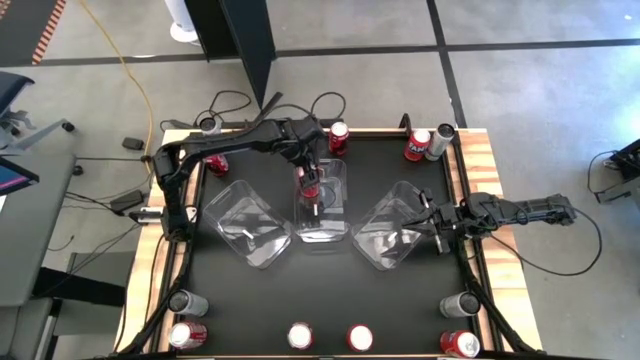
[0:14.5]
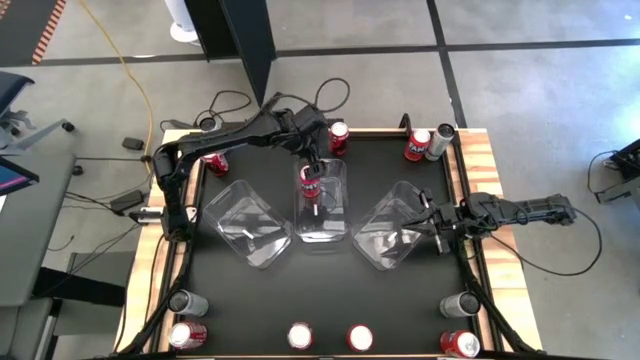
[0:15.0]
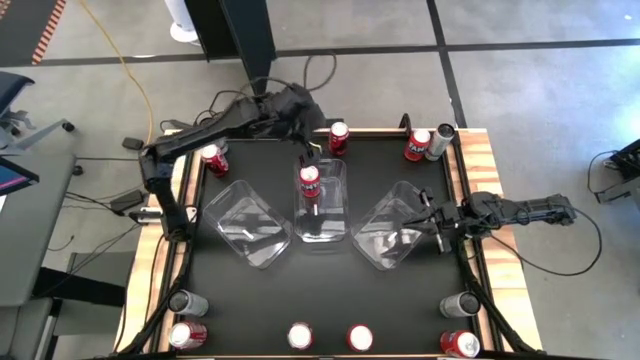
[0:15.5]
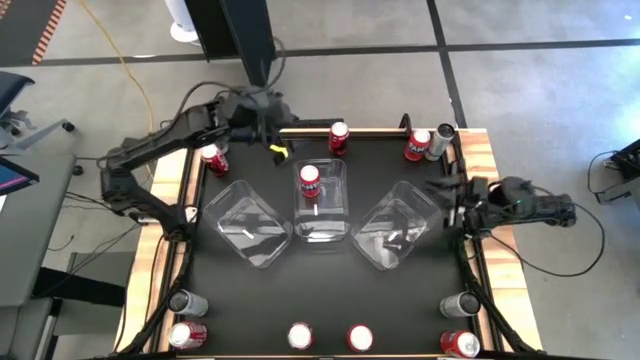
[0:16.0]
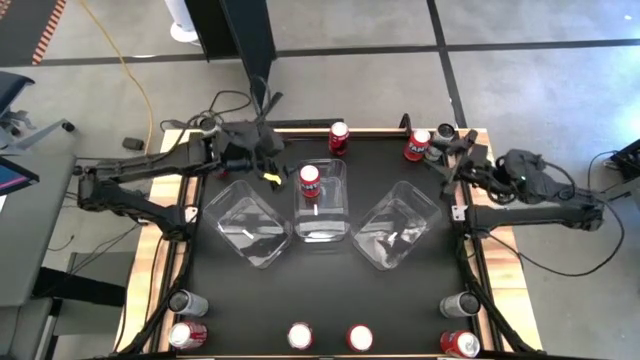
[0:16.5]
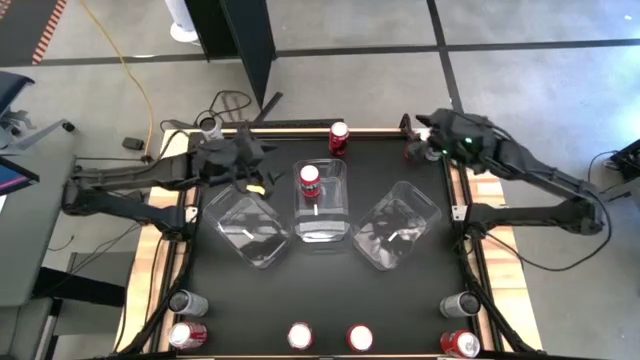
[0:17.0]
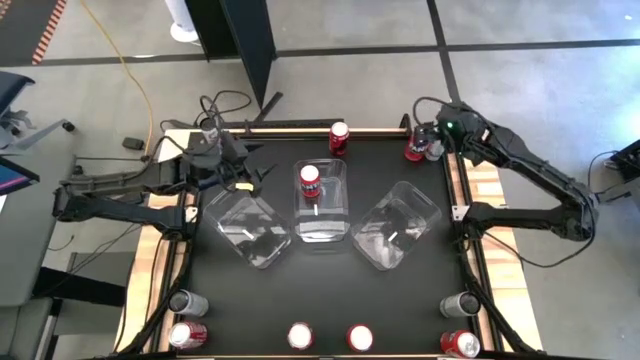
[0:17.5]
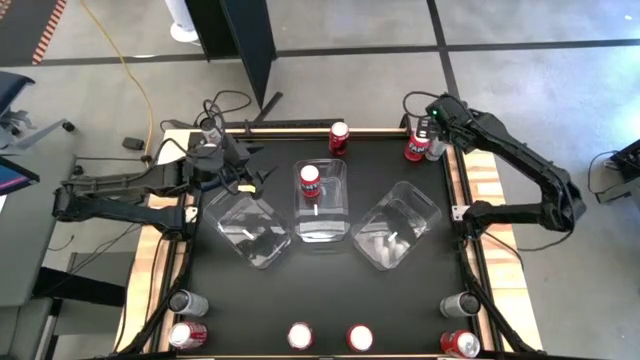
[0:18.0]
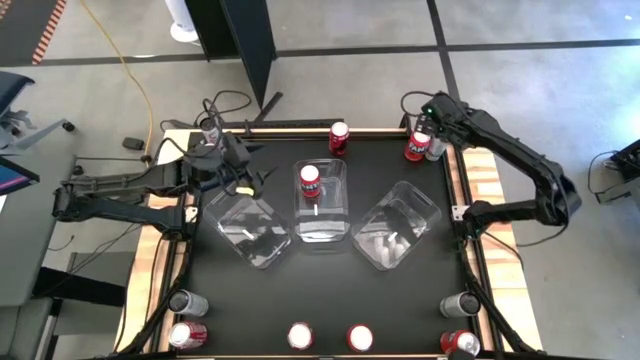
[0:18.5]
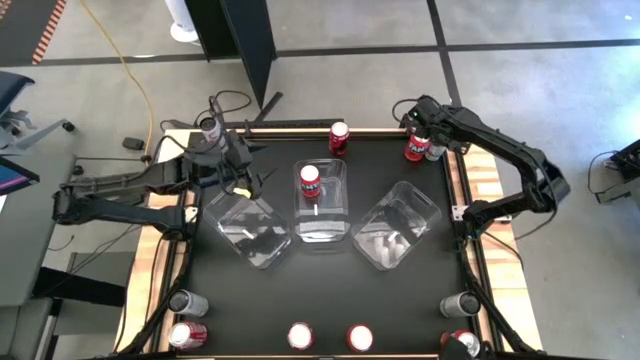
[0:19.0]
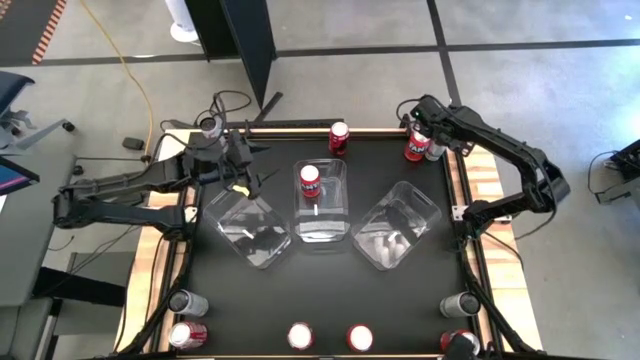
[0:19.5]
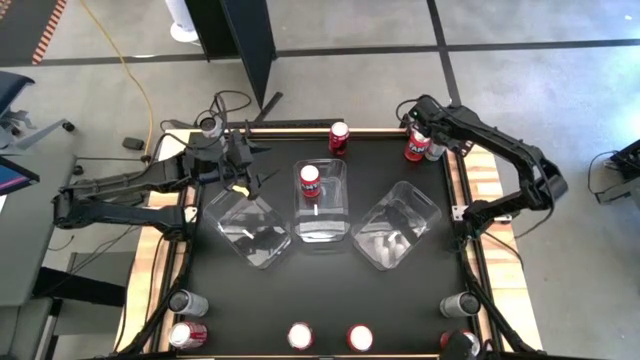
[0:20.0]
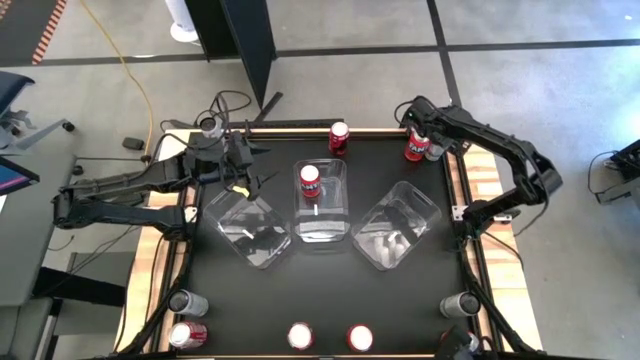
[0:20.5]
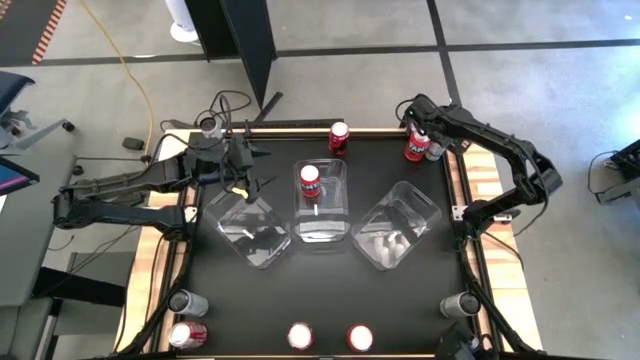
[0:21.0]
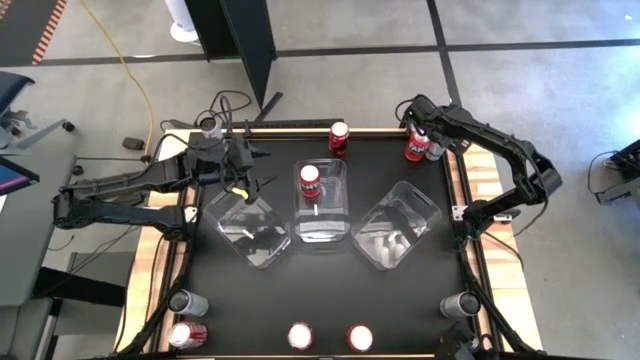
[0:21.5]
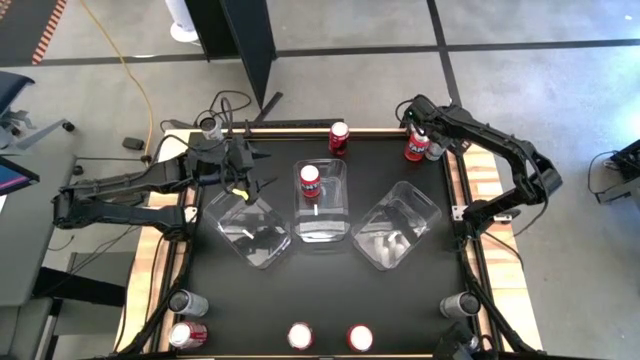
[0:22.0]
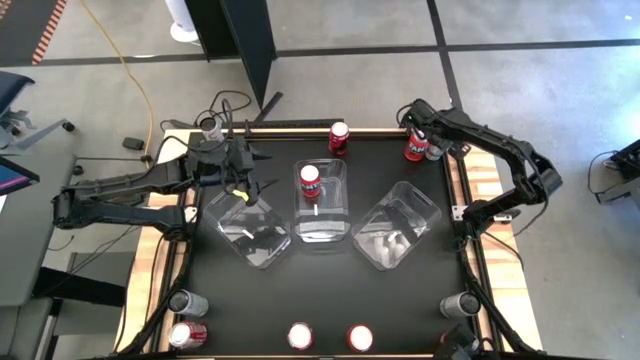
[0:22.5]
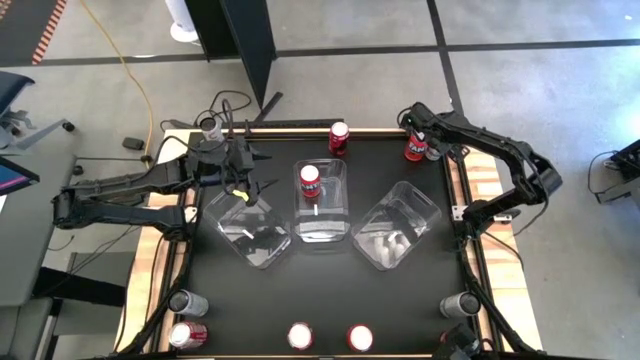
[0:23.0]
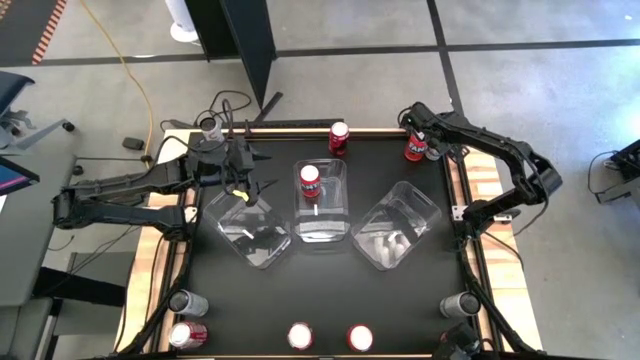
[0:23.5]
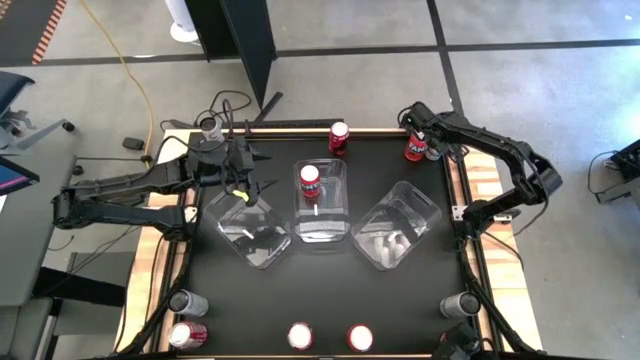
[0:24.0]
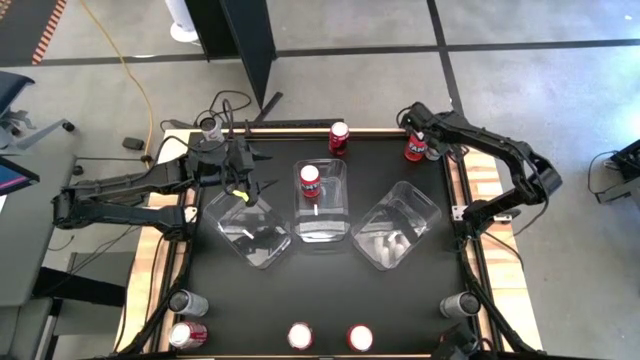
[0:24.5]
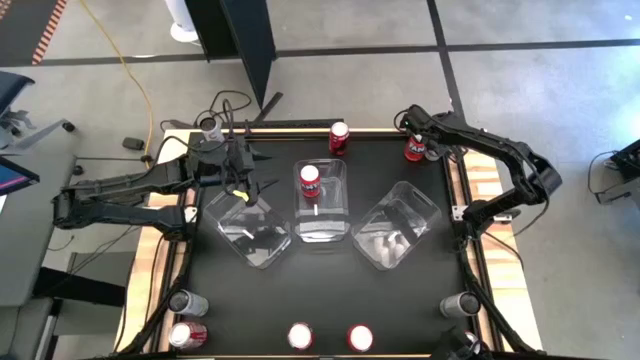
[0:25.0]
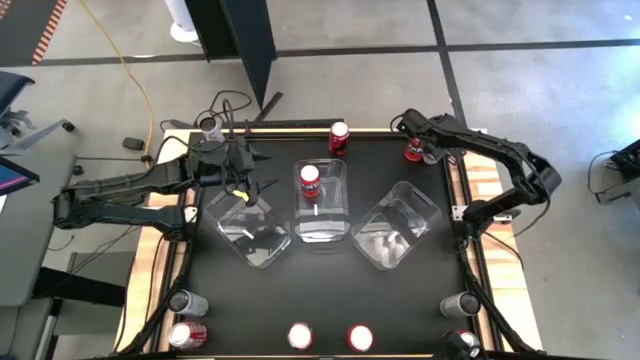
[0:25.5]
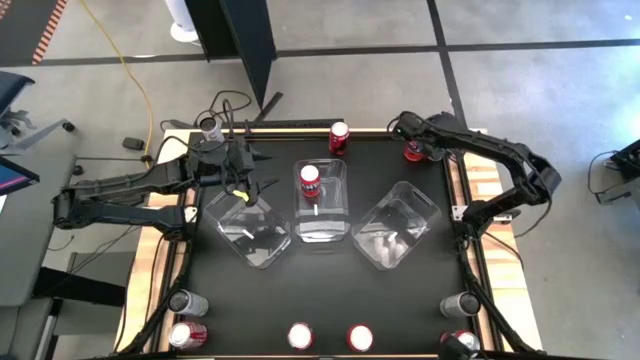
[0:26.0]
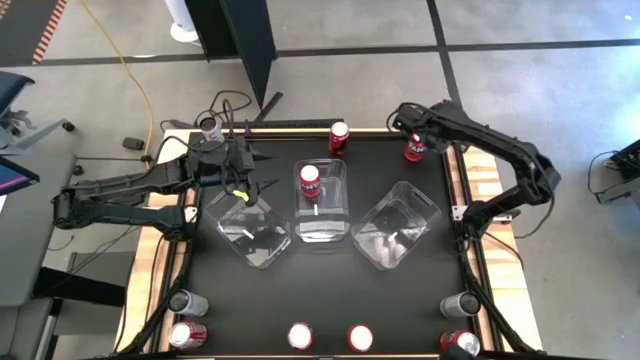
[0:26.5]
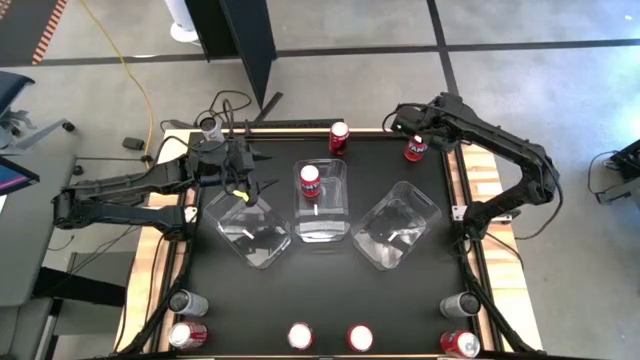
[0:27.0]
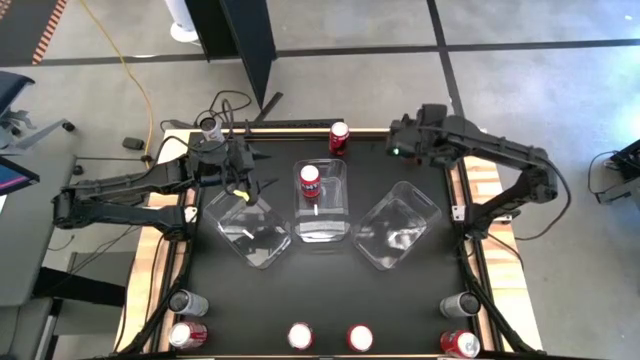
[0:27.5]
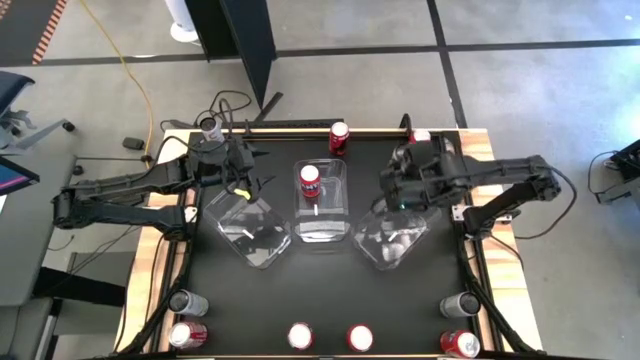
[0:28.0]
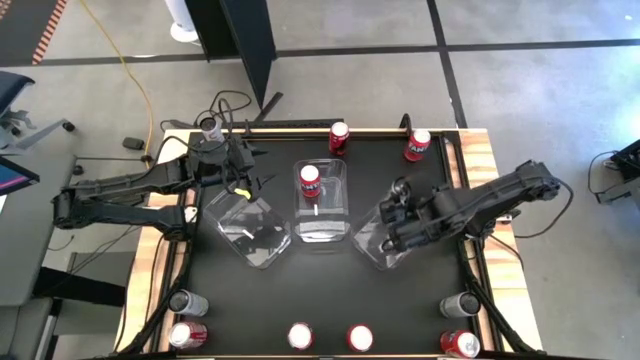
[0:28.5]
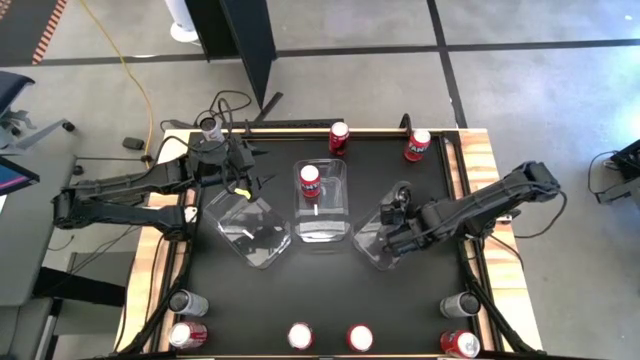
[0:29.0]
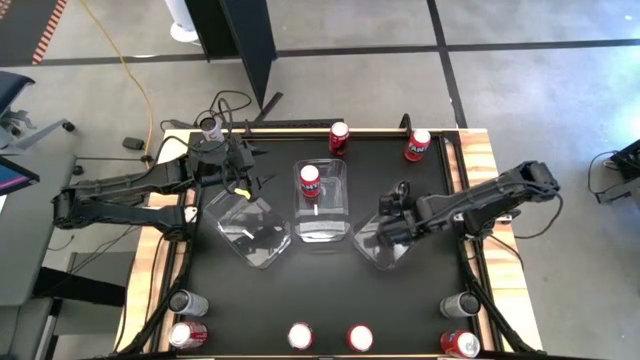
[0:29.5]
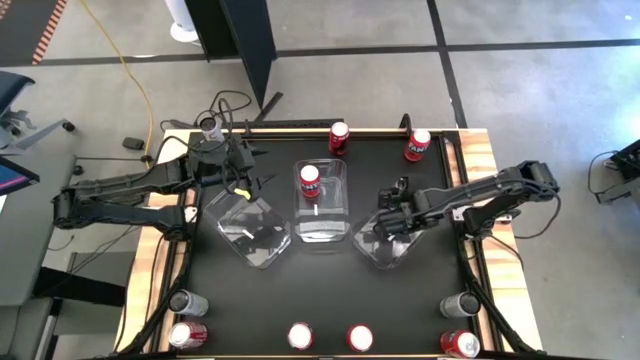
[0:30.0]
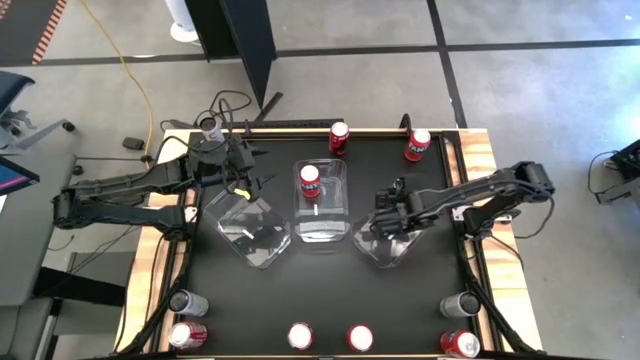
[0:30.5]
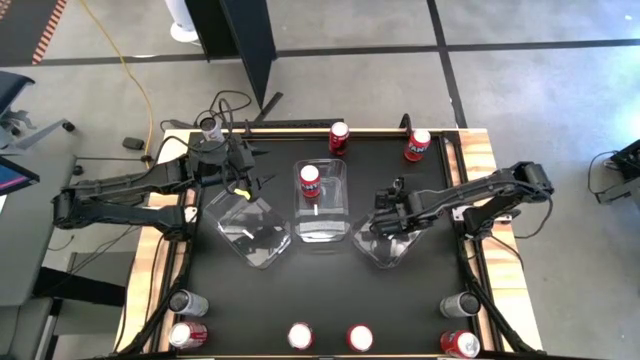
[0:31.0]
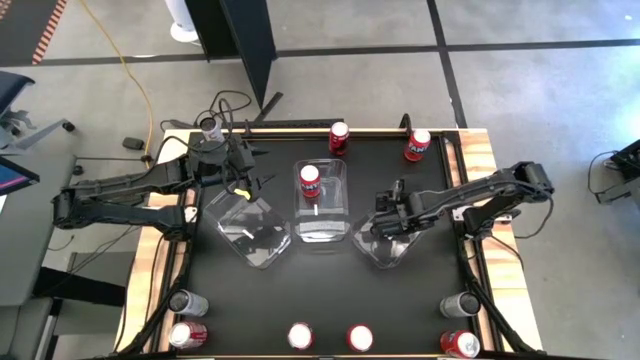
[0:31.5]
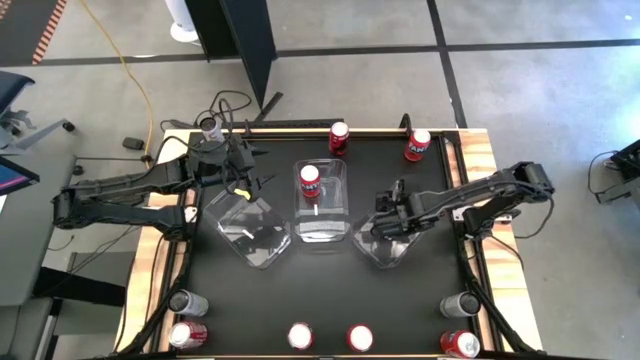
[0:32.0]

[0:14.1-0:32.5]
Task: Sort soda cans
Put the top right white soda can into the right transparent bin

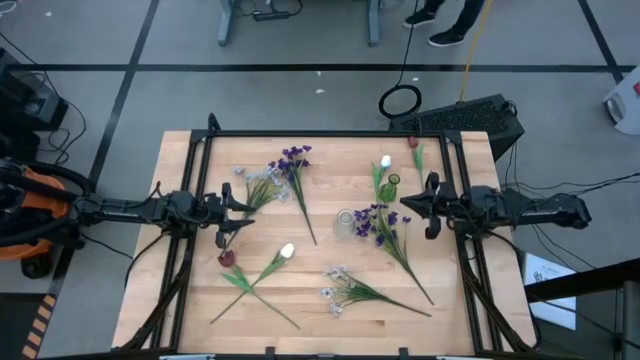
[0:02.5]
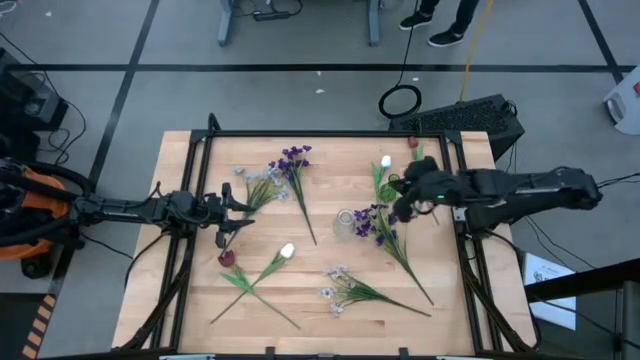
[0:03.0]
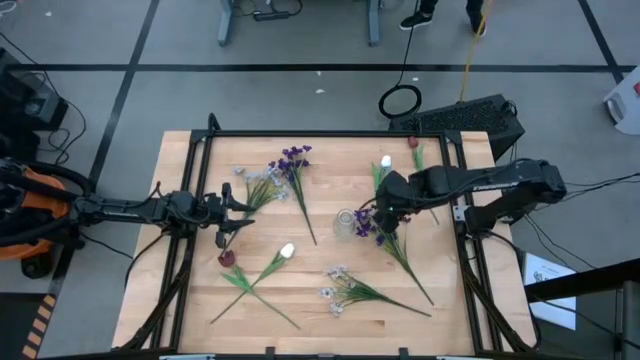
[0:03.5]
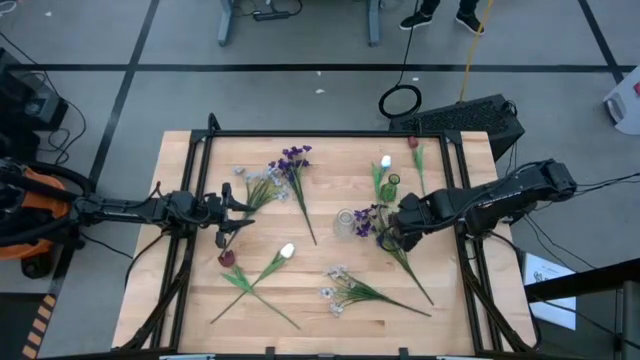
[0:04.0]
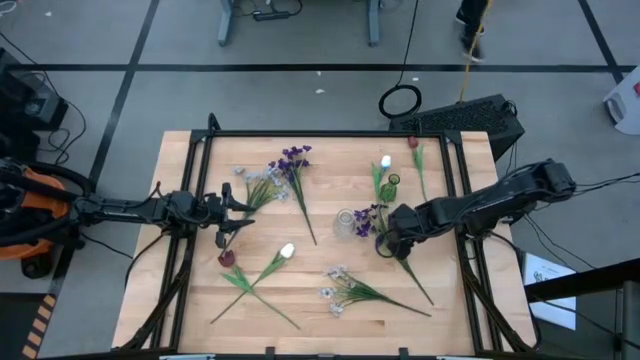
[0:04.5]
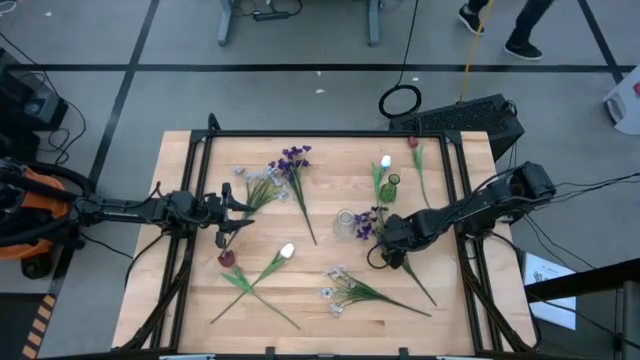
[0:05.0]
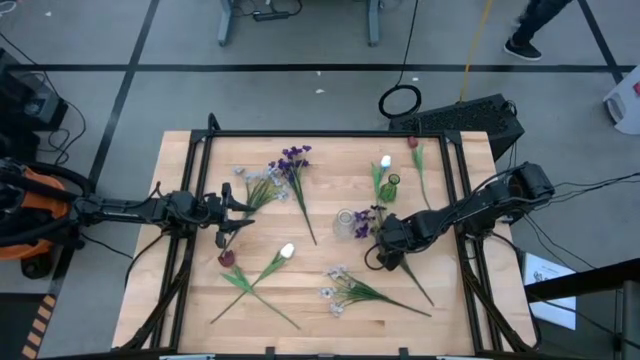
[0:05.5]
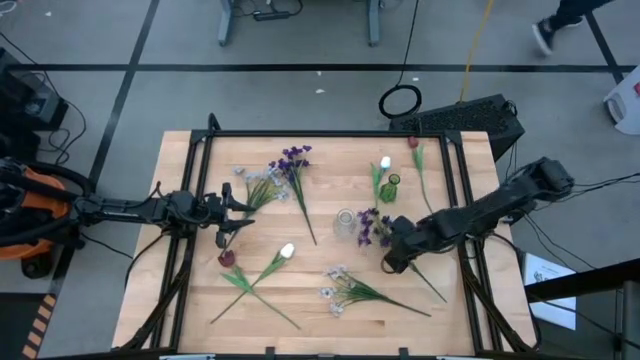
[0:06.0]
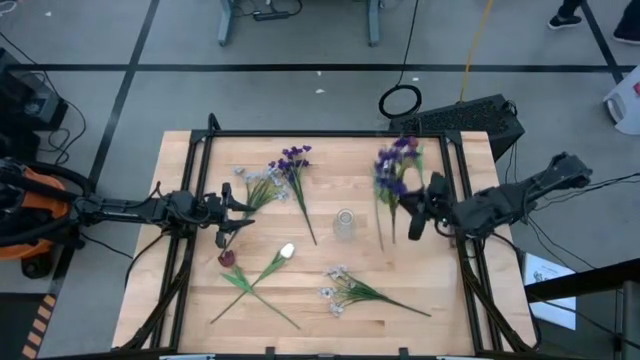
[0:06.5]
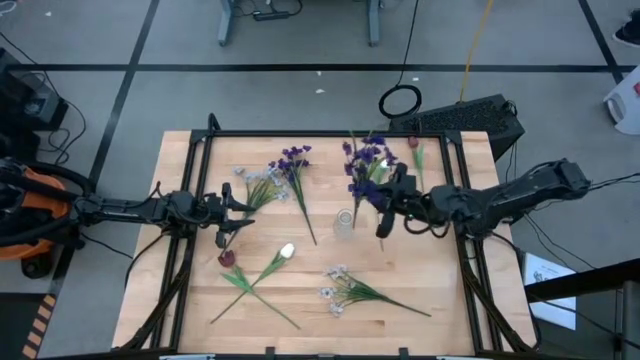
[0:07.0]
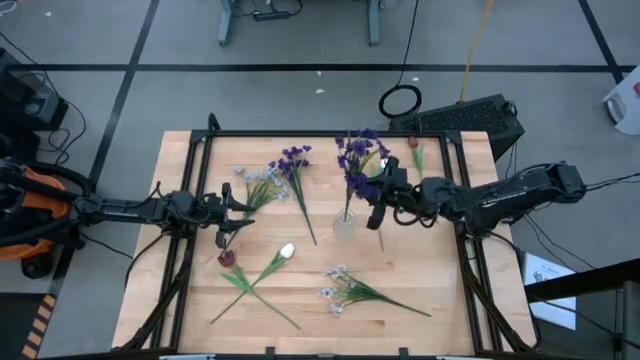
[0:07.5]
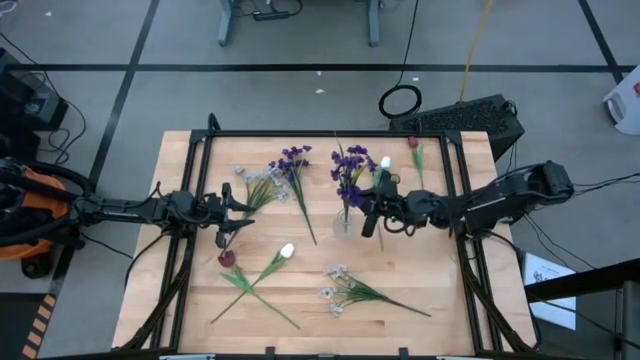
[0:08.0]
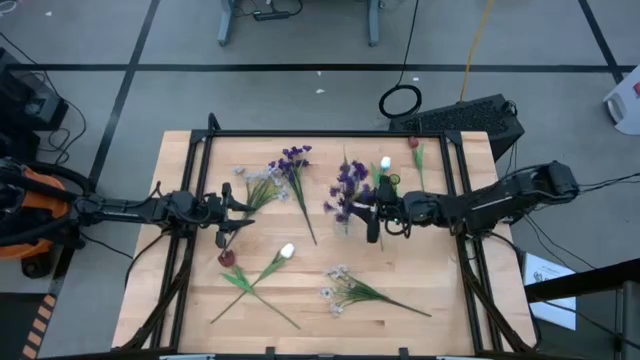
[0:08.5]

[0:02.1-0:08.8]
Task: Sort flowers into vase by color
Put the right purple flowers into the transparent vase
